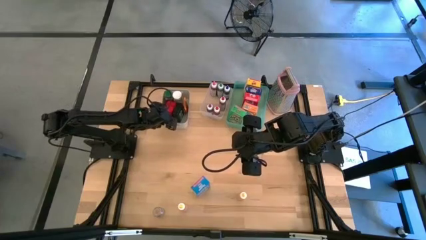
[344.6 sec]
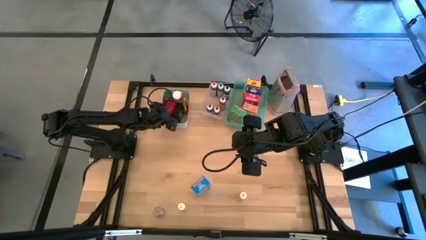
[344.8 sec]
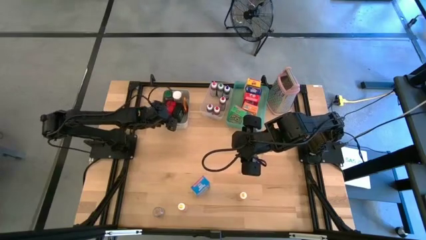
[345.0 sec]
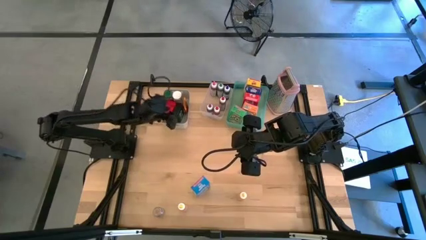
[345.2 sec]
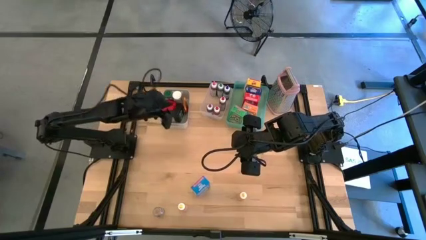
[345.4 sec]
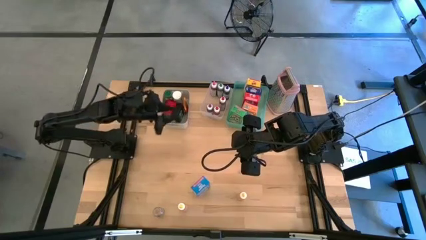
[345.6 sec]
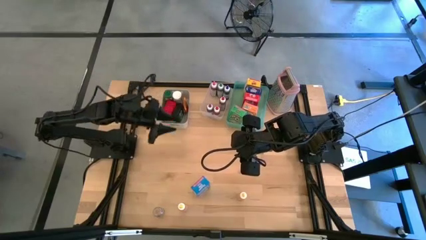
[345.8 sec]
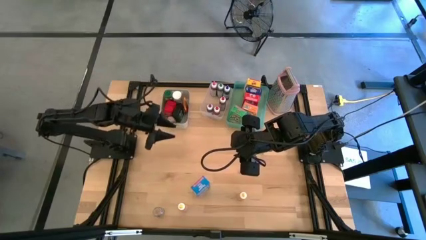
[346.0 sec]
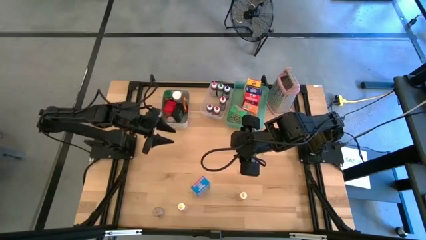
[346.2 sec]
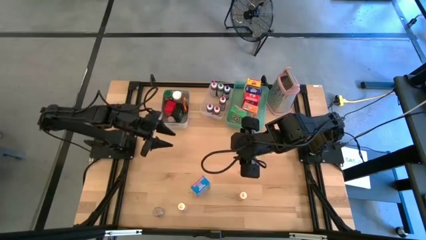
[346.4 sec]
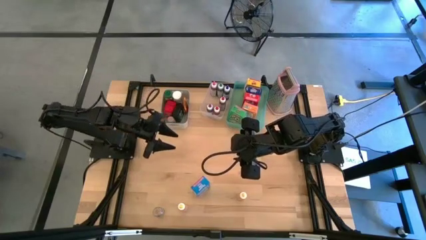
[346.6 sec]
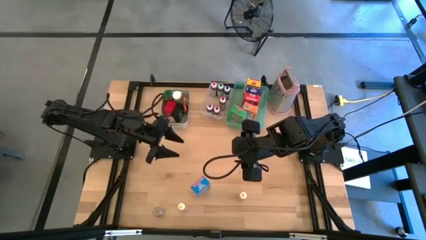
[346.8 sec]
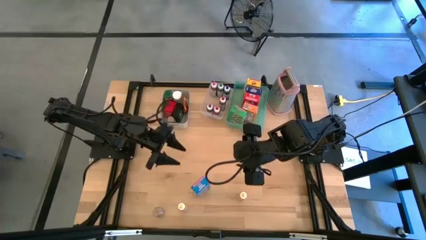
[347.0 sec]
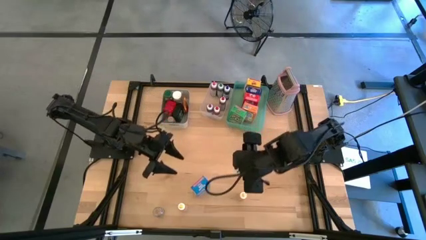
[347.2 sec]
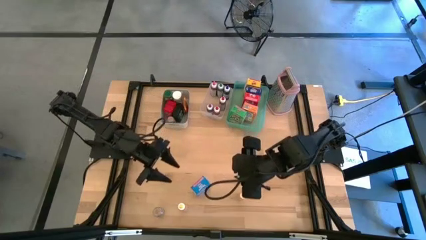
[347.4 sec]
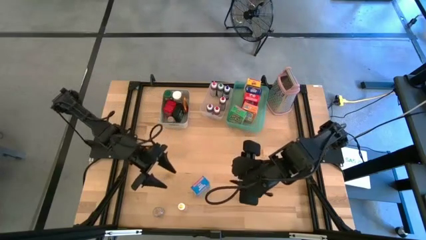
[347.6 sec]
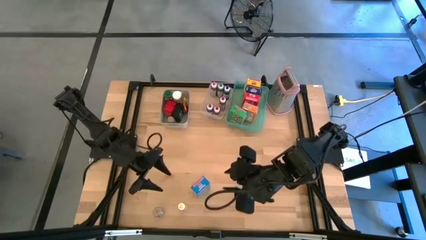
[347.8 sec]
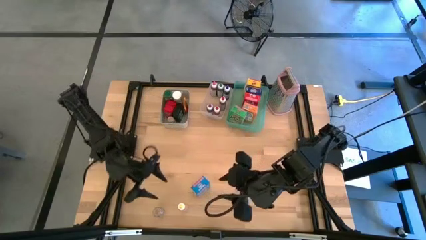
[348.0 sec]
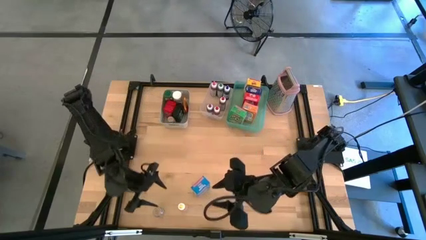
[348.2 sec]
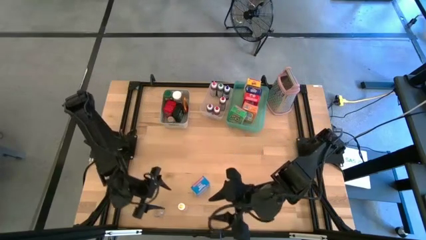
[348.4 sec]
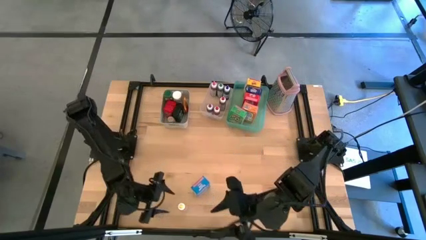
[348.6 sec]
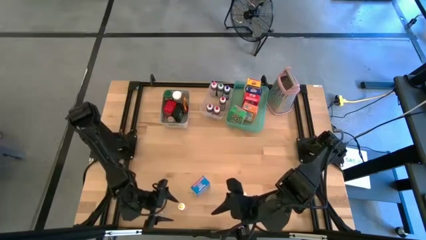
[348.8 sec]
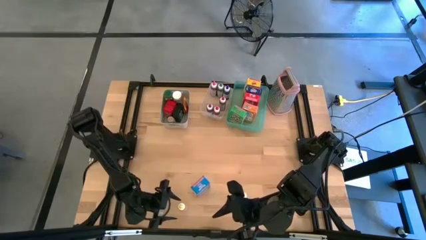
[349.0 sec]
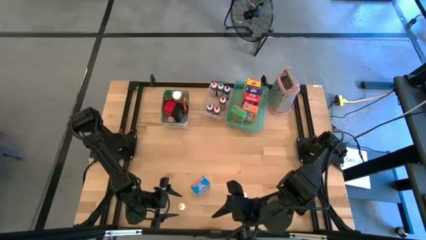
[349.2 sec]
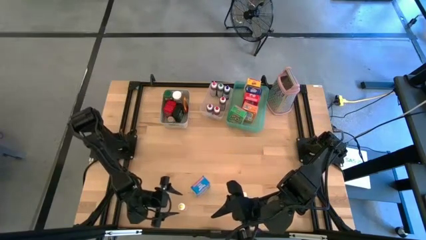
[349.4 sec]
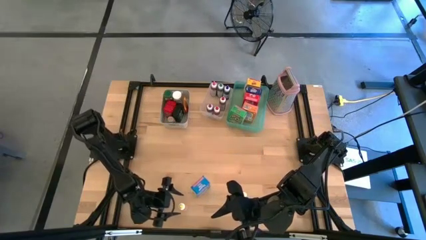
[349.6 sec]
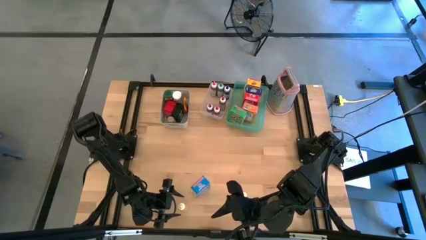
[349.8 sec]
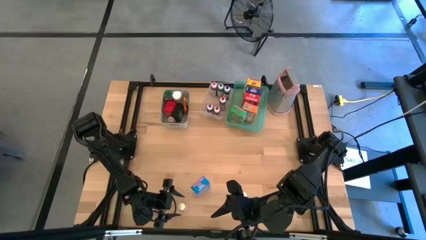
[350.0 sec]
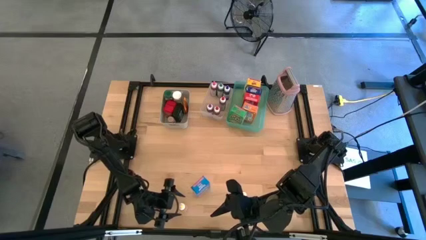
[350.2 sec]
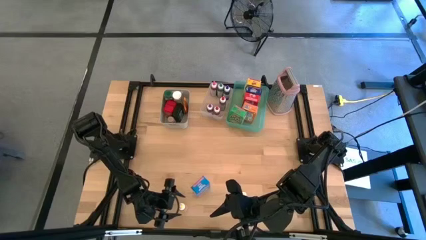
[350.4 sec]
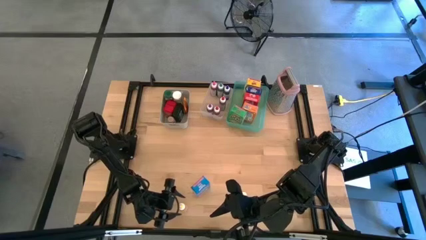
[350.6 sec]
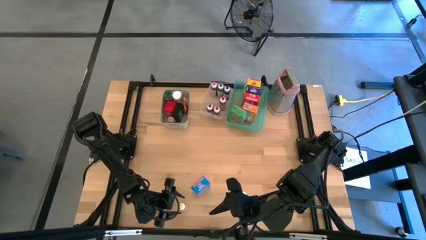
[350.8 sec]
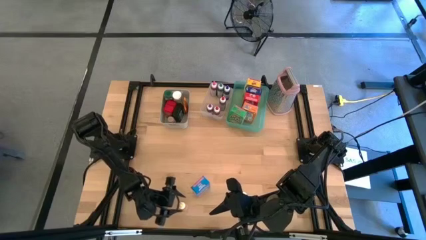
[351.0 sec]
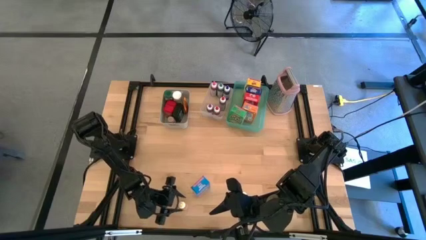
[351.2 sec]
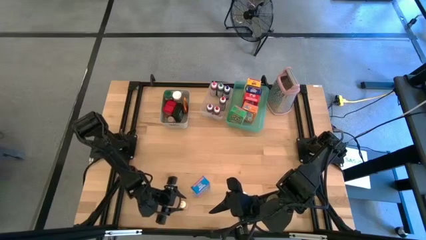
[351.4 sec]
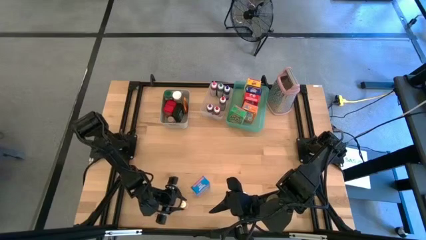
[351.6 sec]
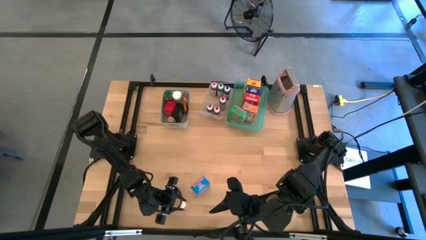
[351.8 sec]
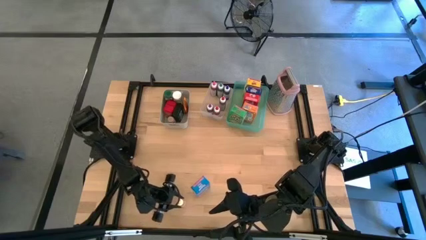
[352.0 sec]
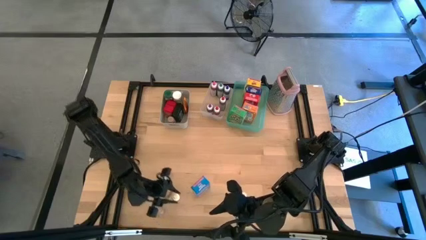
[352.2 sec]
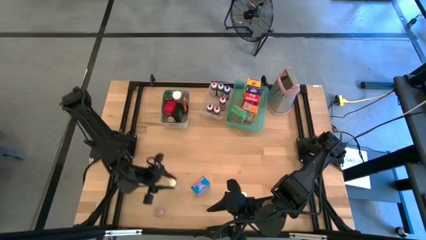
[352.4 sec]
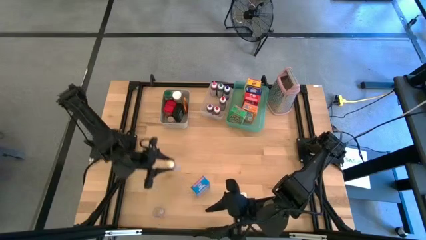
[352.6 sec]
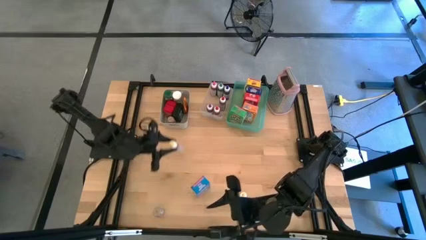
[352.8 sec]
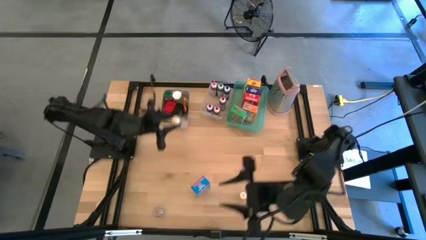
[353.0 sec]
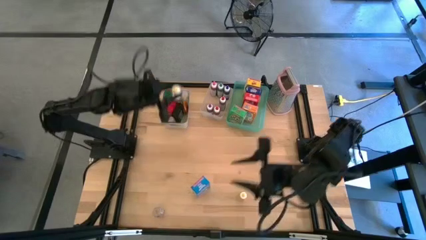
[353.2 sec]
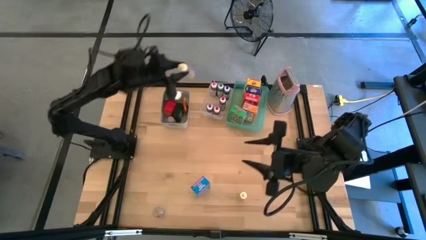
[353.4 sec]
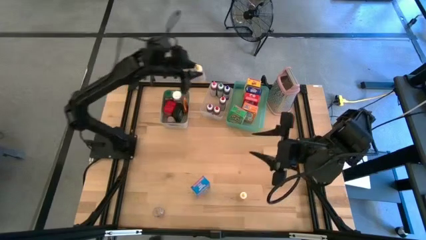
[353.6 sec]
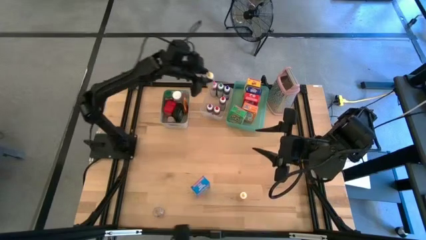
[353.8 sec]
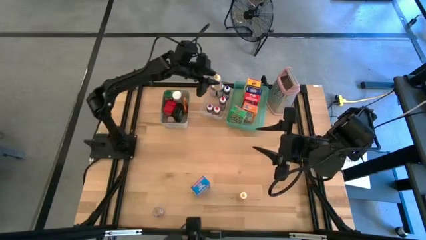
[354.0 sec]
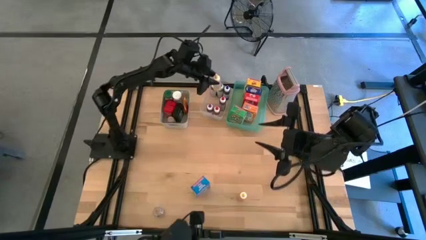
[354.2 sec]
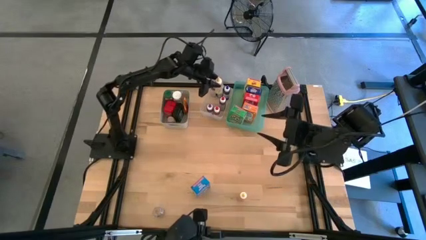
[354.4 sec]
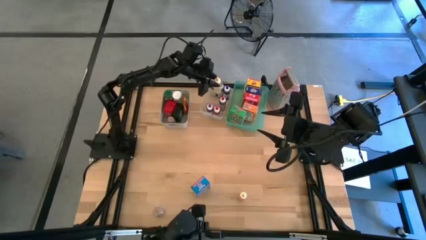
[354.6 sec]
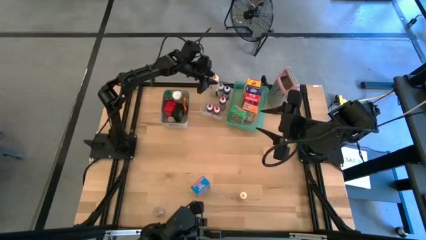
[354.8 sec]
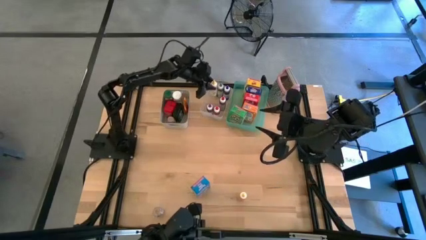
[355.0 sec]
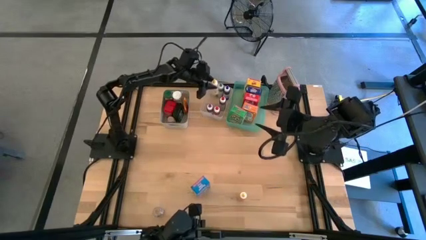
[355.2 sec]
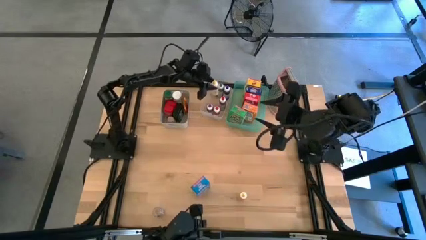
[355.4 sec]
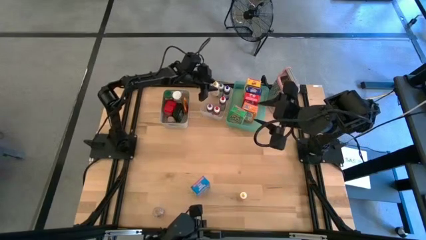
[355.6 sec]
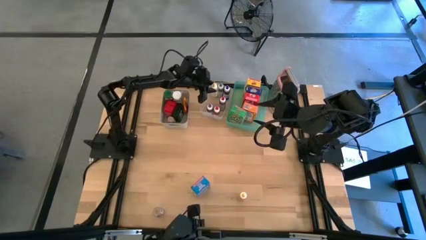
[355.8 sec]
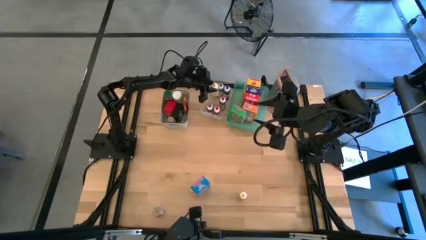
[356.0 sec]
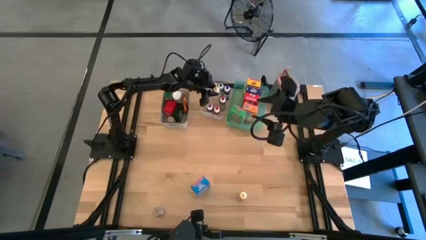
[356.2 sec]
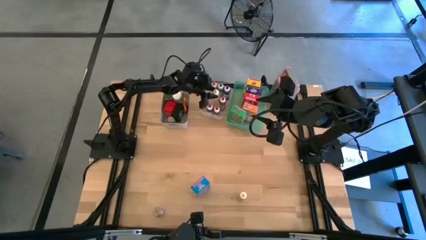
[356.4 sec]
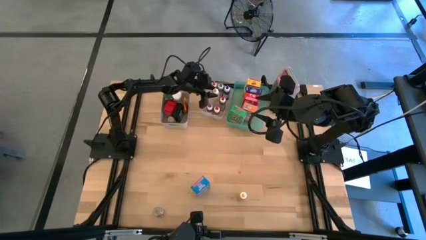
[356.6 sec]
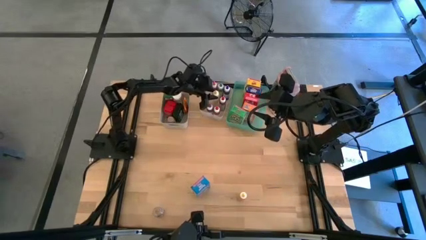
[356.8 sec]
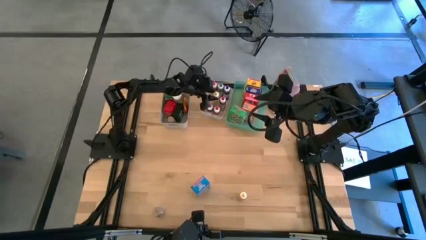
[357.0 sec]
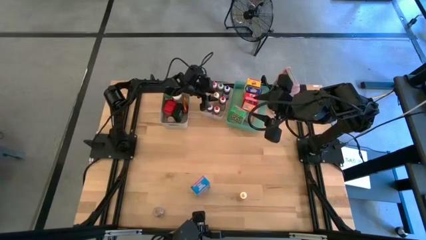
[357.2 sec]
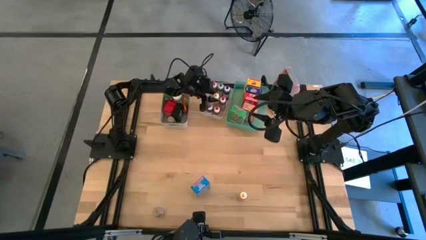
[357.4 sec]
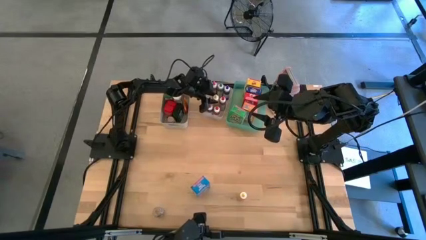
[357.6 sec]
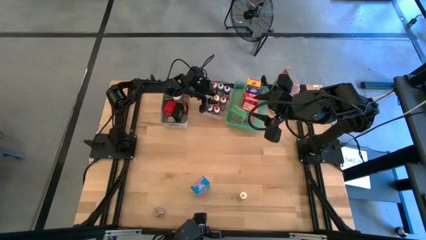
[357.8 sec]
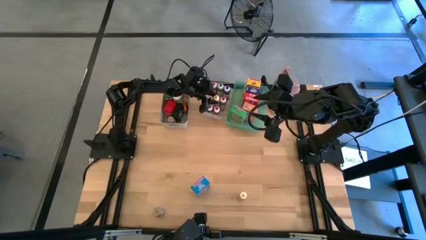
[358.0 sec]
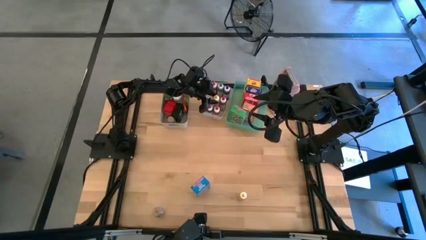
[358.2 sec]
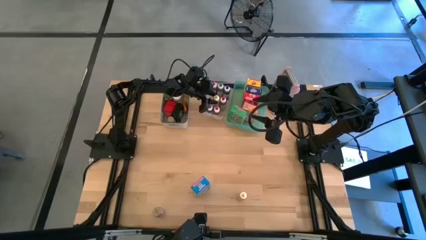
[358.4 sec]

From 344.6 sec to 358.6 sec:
Task: Pick & Place Kitchen Items
Put the left yellow food coloring bottle into the transparent bin
